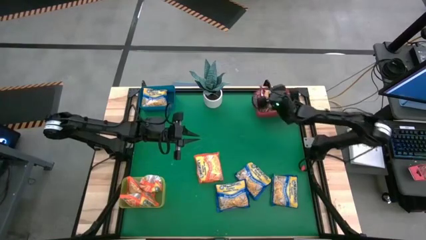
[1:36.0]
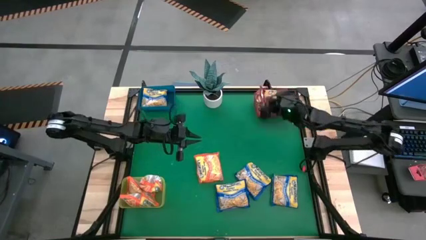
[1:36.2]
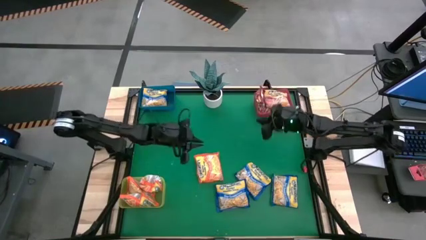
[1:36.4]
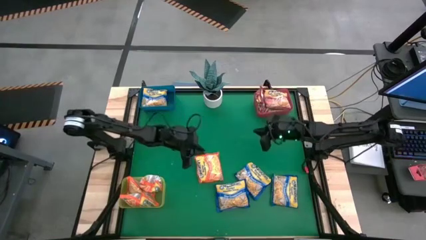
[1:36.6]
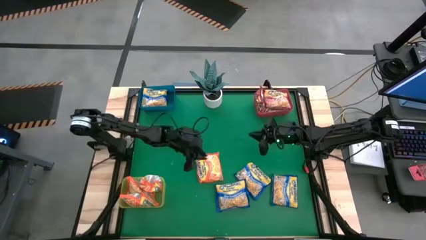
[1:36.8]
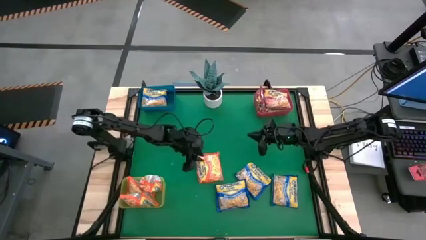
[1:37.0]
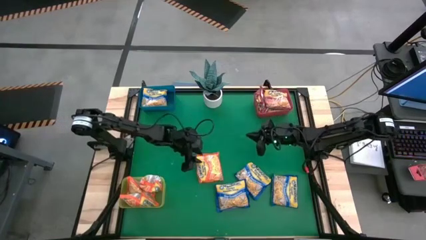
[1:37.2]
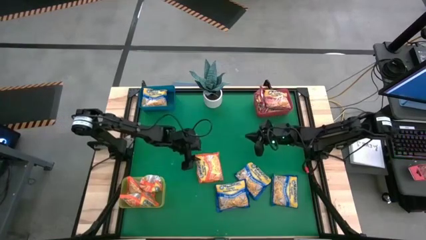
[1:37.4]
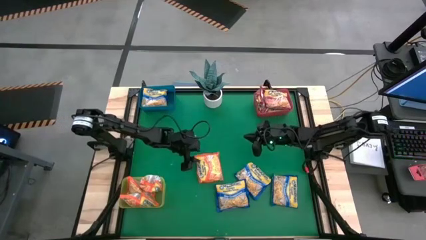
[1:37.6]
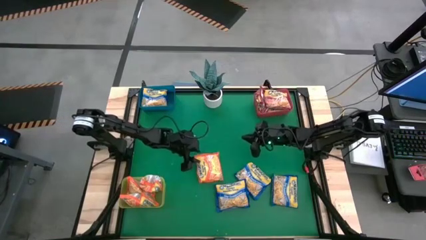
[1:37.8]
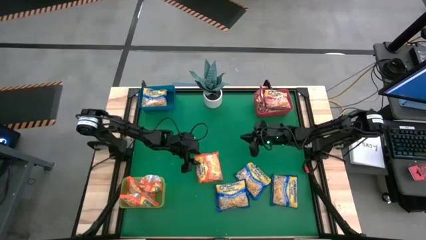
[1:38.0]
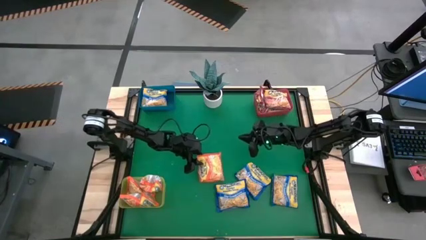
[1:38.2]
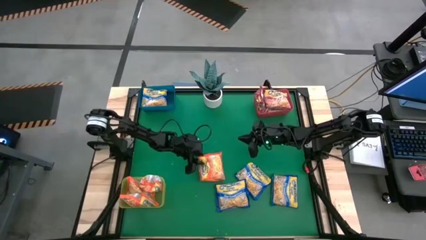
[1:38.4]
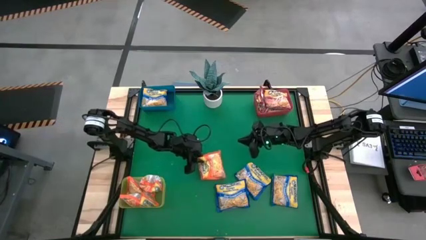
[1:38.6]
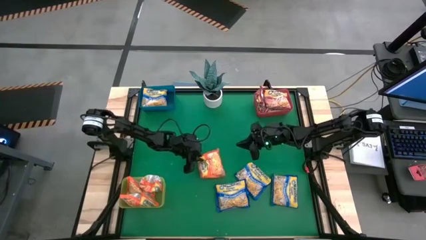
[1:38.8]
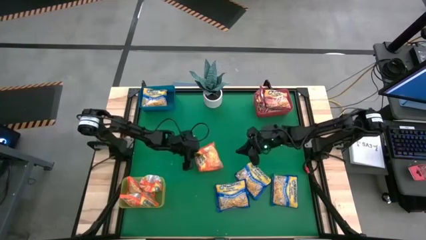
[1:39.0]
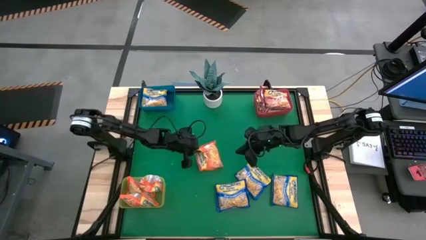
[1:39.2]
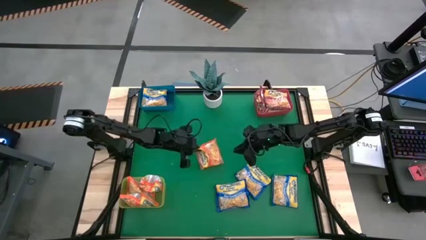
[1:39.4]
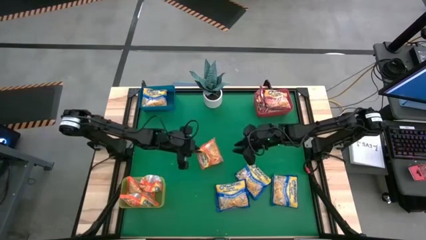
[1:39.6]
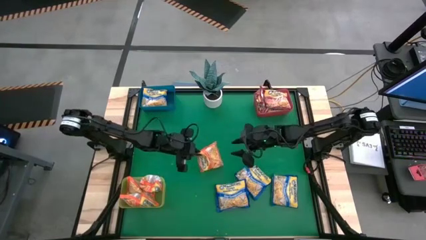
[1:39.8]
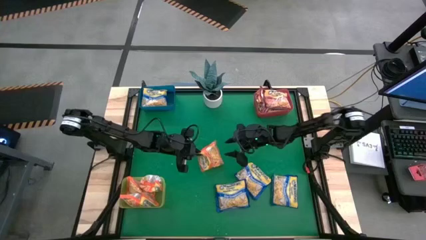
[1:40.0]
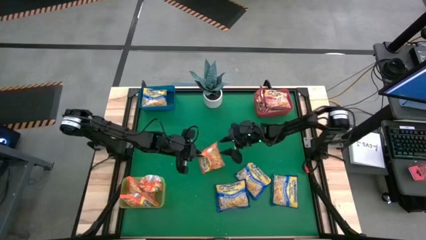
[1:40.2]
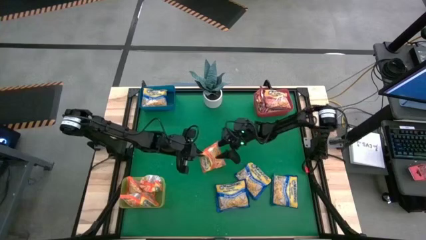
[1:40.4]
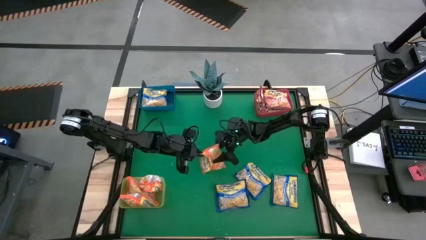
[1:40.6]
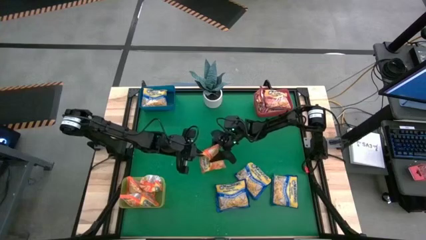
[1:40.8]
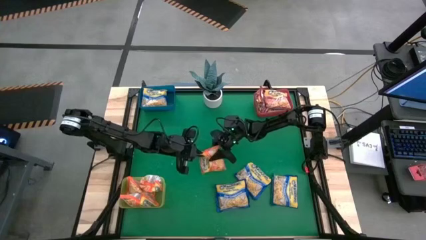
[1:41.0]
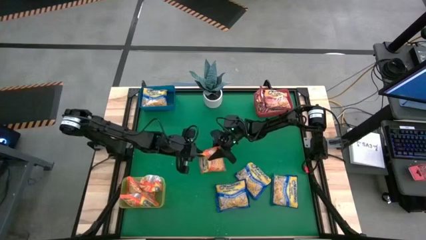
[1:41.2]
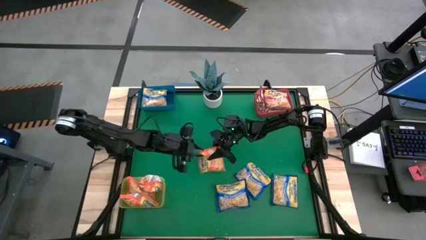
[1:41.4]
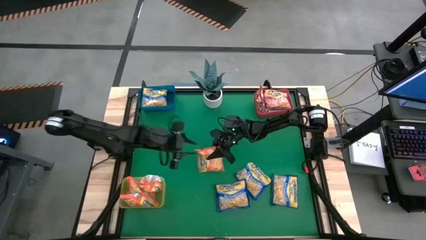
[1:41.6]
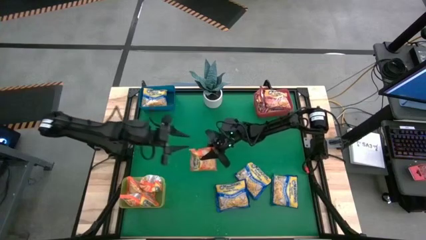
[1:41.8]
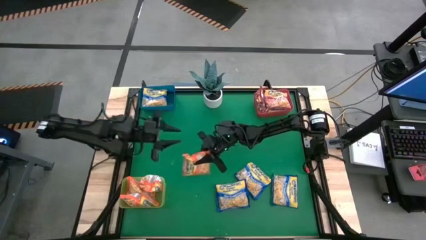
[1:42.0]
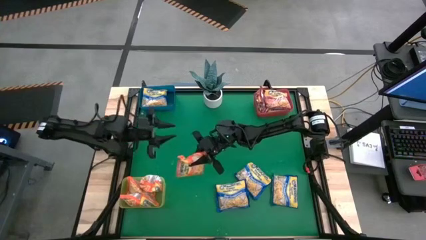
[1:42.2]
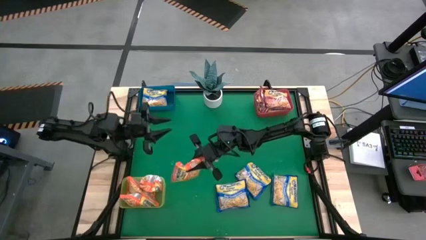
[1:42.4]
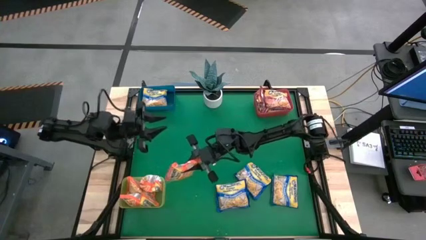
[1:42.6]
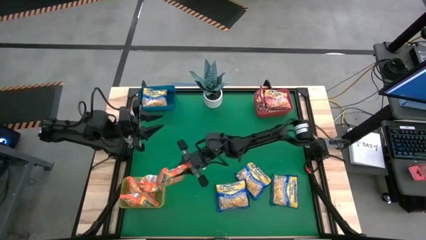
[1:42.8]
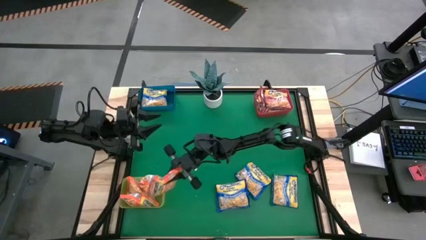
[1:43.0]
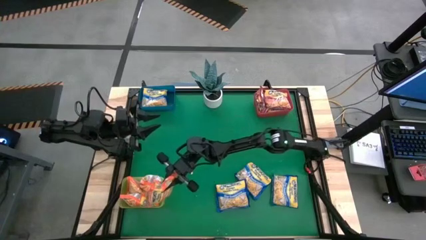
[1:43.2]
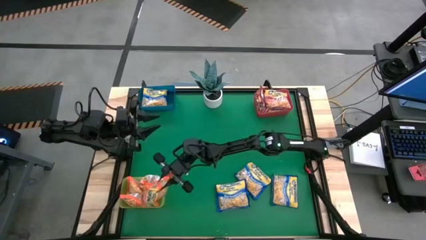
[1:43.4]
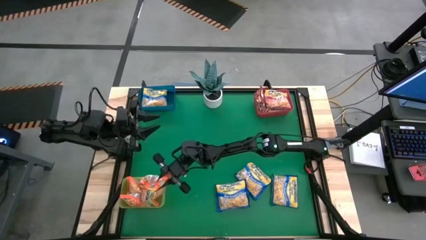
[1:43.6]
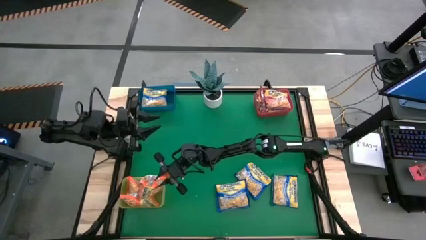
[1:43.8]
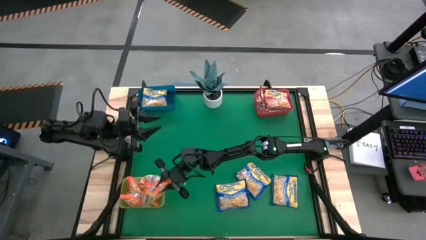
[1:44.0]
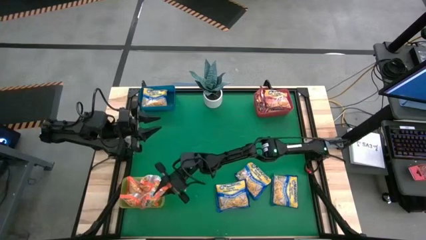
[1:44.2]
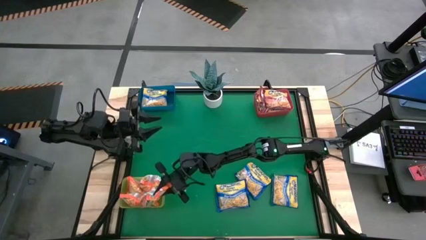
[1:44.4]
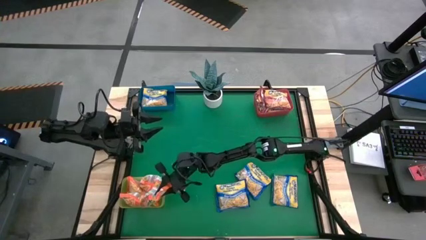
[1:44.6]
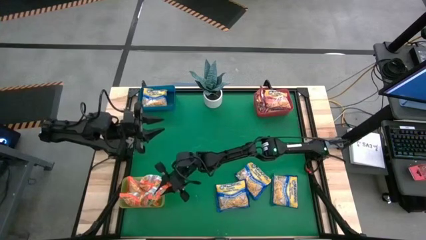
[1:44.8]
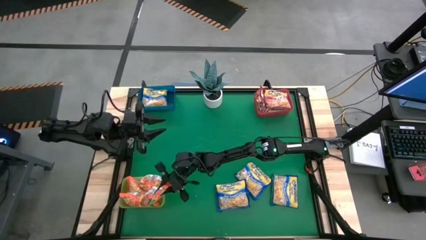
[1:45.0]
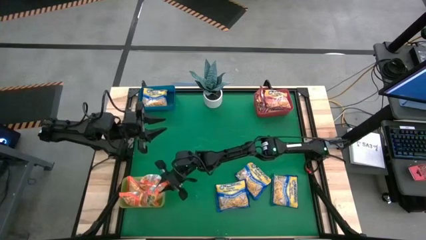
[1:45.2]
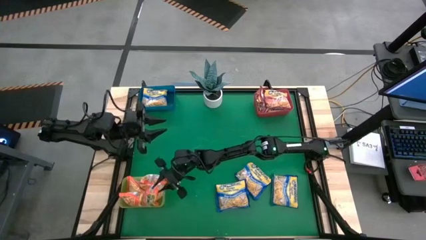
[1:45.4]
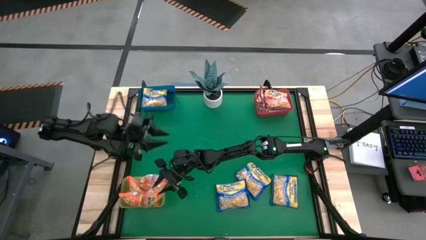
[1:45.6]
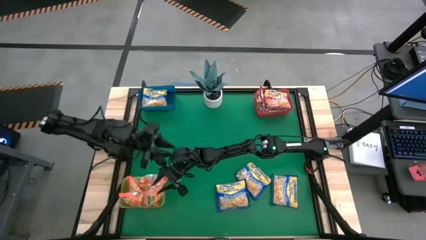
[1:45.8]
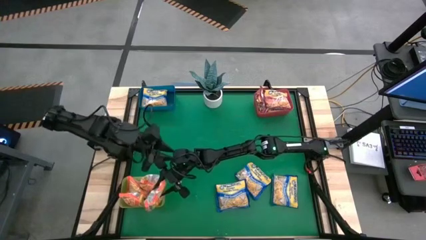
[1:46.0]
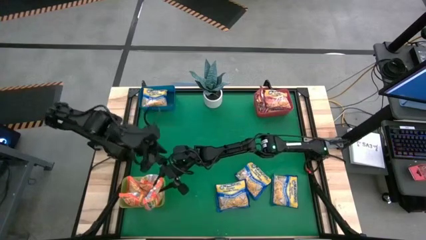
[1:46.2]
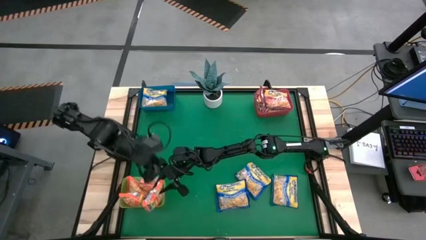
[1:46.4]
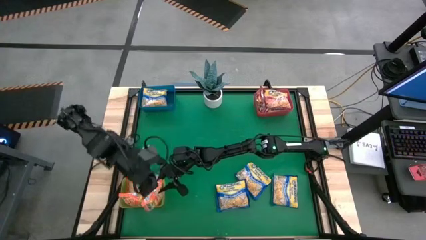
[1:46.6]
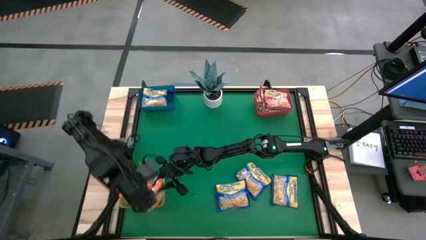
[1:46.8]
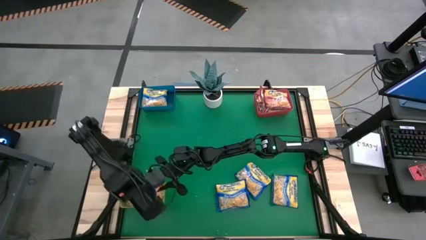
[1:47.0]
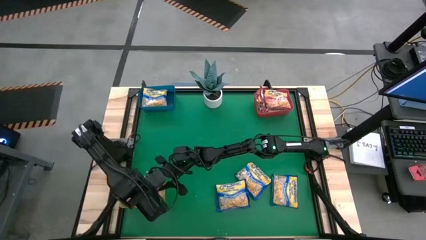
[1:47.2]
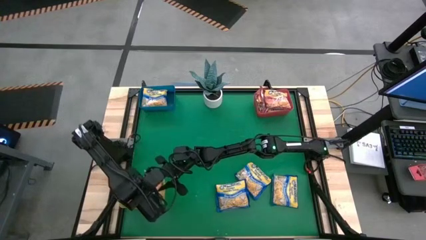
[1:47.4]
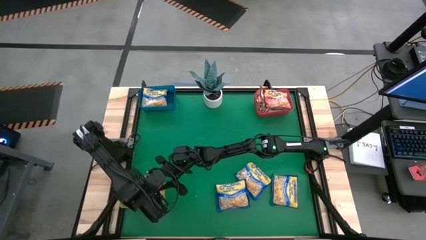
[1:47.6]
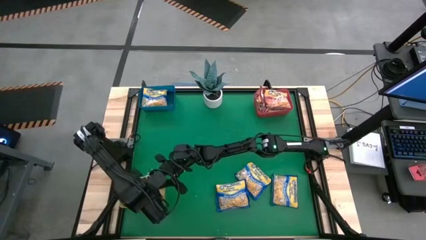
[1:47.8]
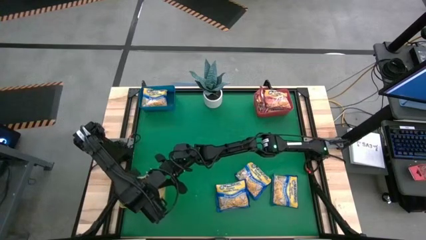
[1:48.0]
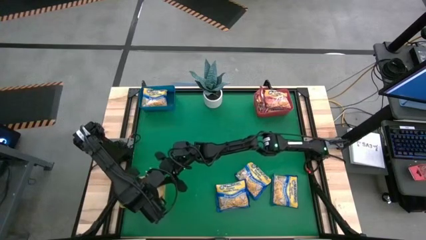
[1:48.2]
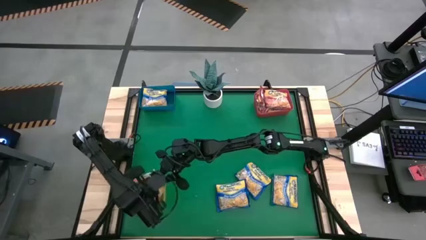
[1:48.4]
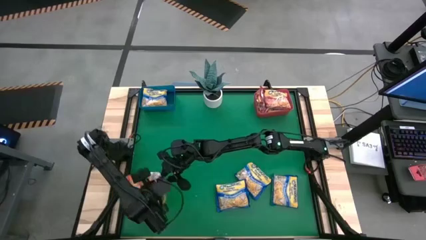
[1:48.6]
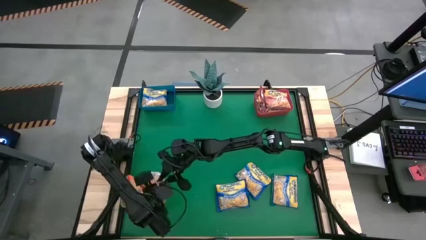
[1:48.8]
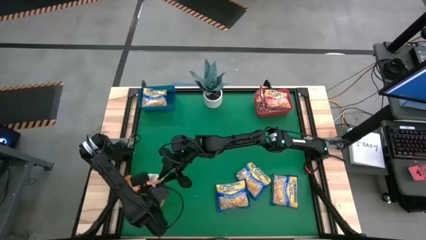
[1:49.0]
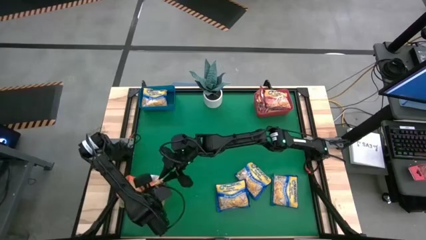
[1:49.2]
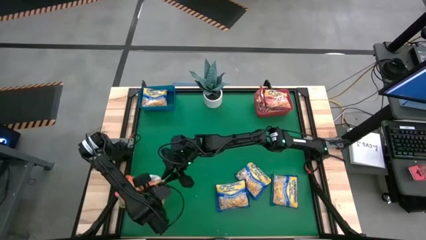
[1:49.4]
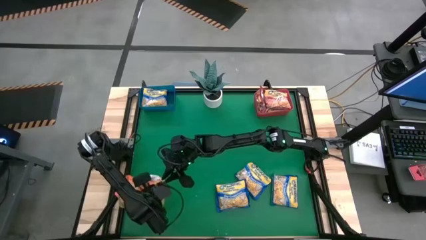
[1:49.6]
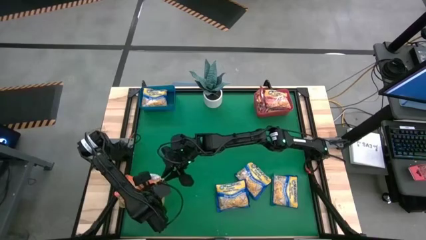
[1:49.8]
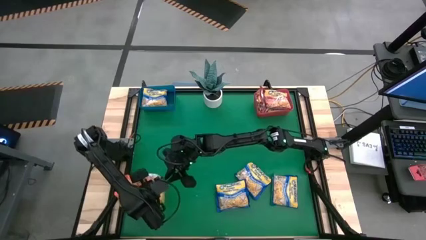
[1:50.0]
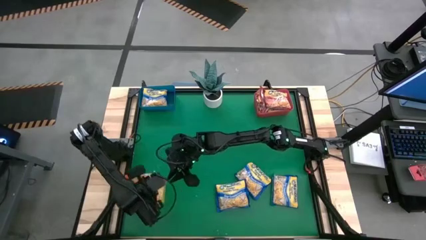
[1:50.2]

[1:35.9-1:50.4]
Task: Sort Maruchan noodles
Put the orange noodle pack into the yellow bin
